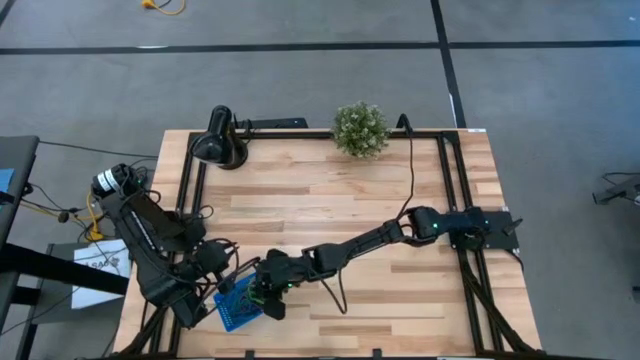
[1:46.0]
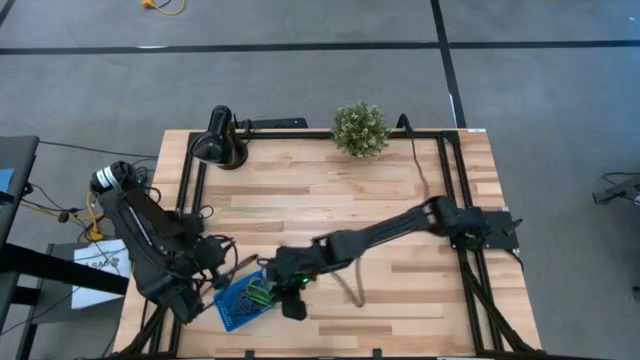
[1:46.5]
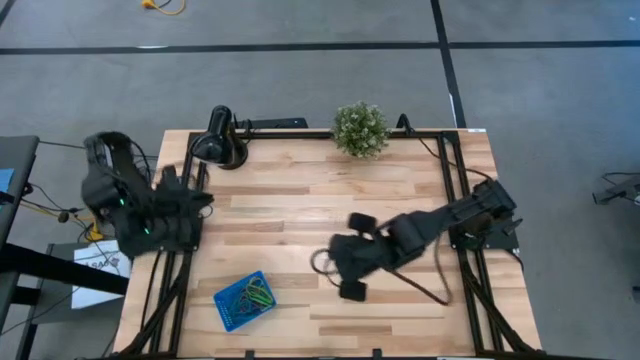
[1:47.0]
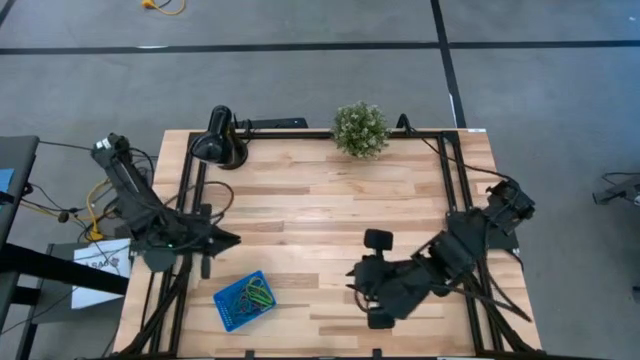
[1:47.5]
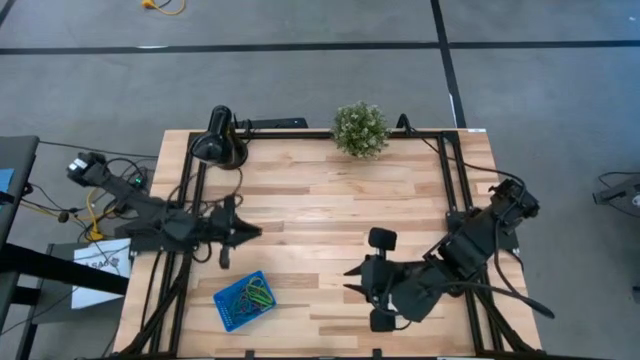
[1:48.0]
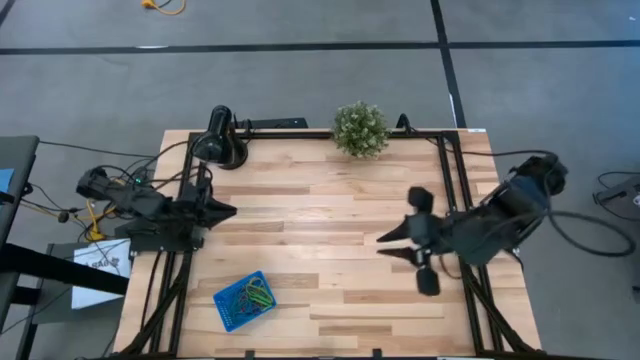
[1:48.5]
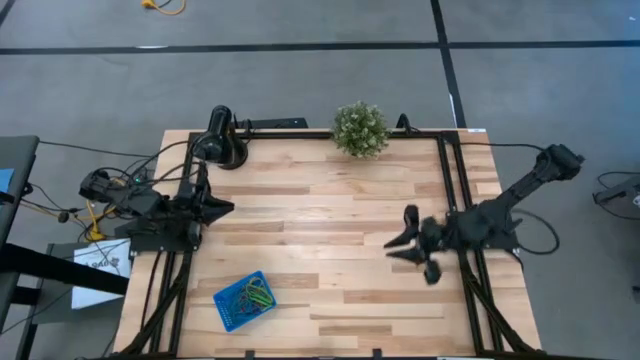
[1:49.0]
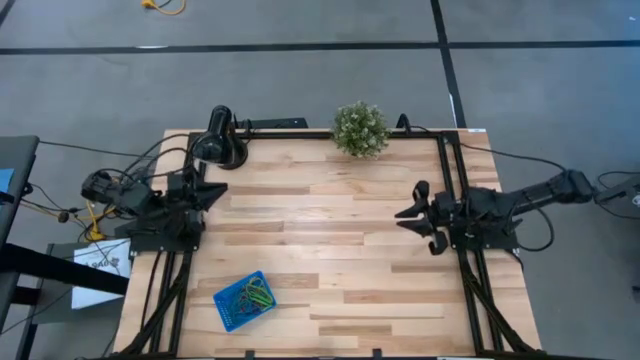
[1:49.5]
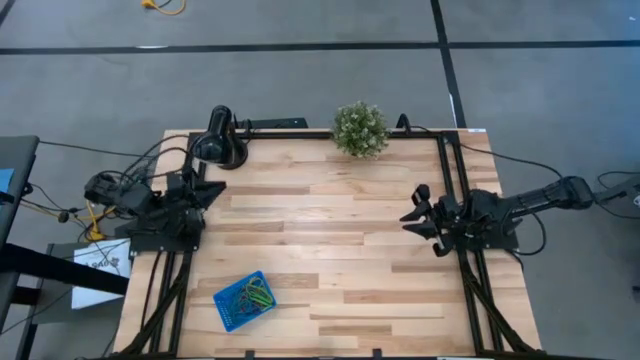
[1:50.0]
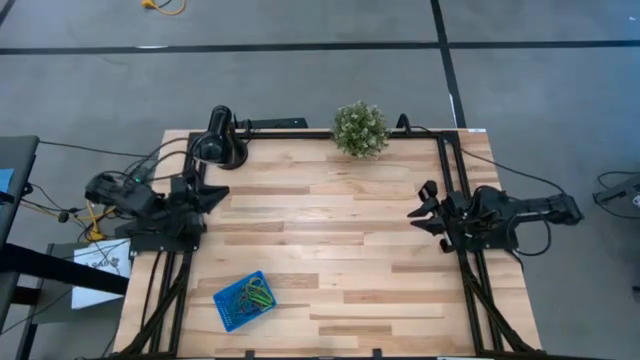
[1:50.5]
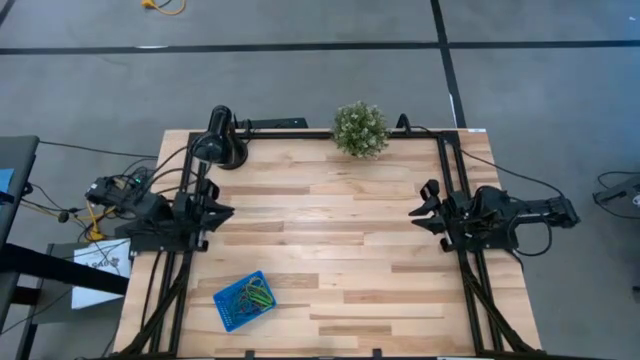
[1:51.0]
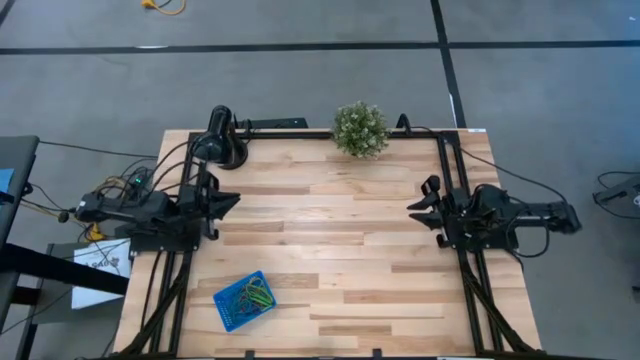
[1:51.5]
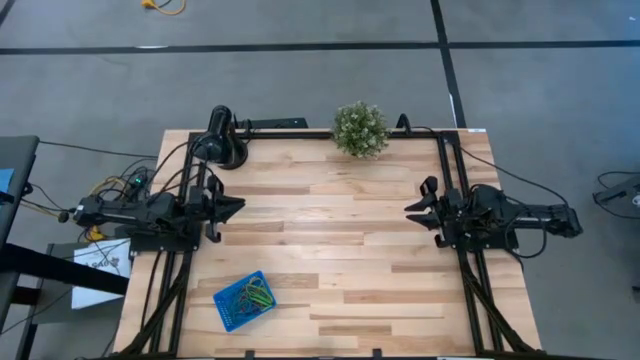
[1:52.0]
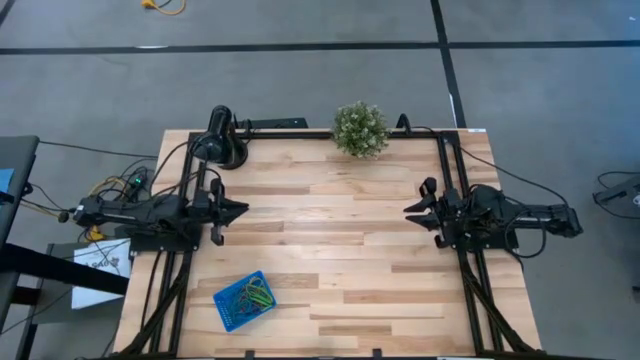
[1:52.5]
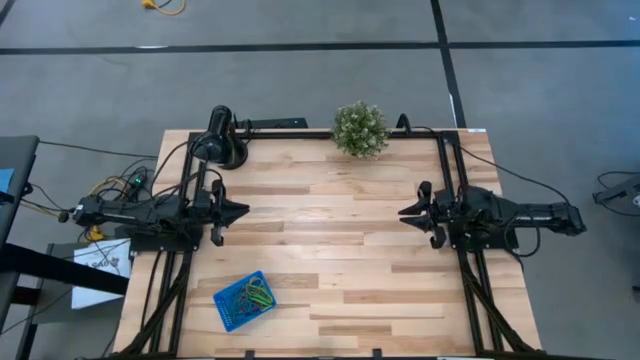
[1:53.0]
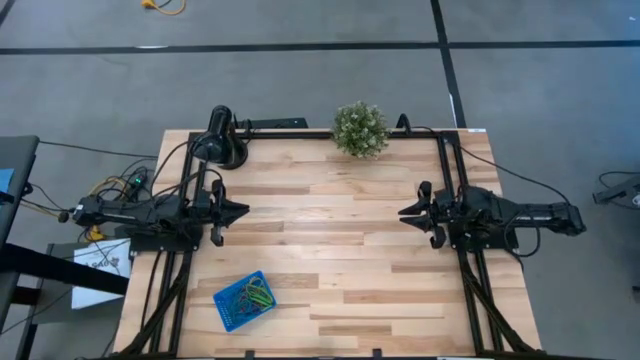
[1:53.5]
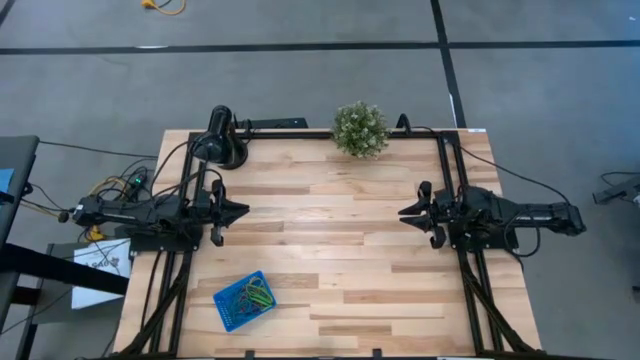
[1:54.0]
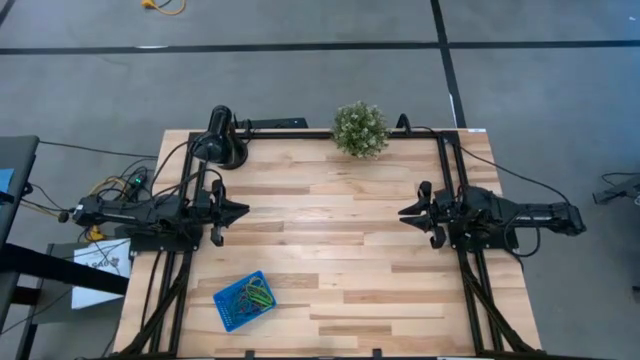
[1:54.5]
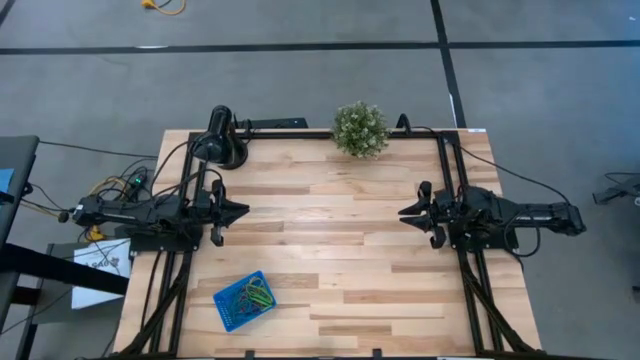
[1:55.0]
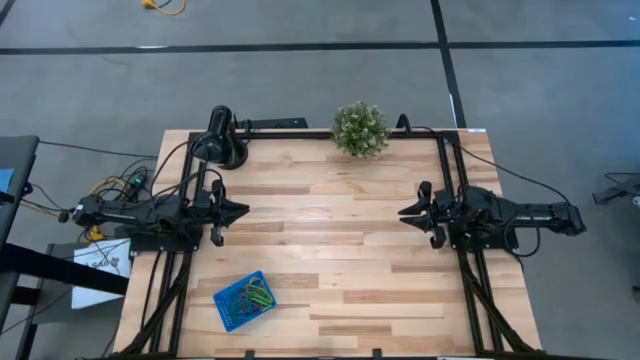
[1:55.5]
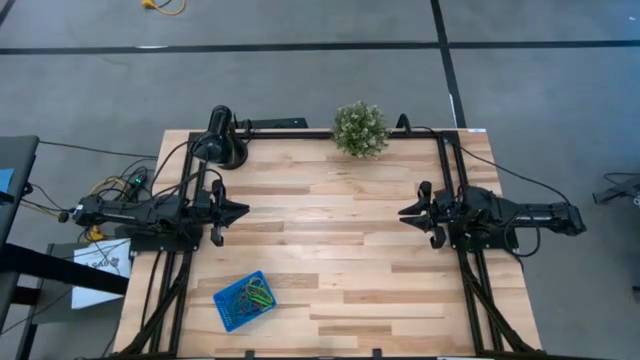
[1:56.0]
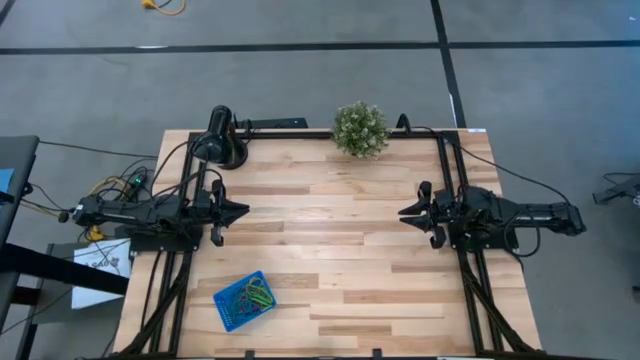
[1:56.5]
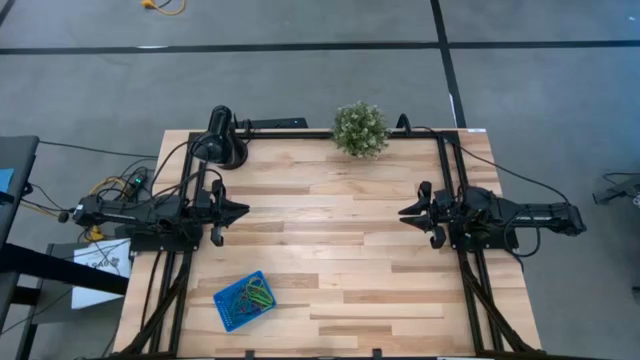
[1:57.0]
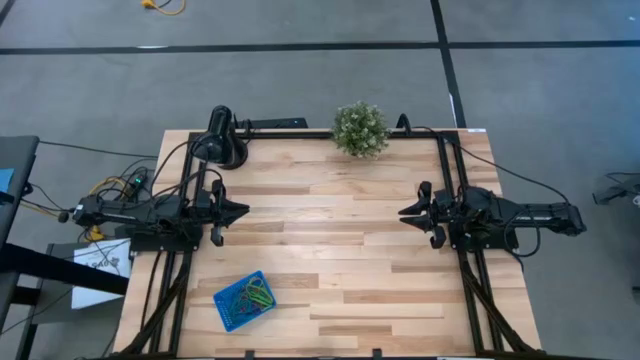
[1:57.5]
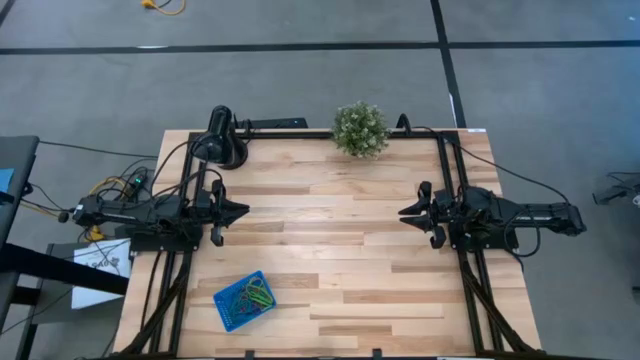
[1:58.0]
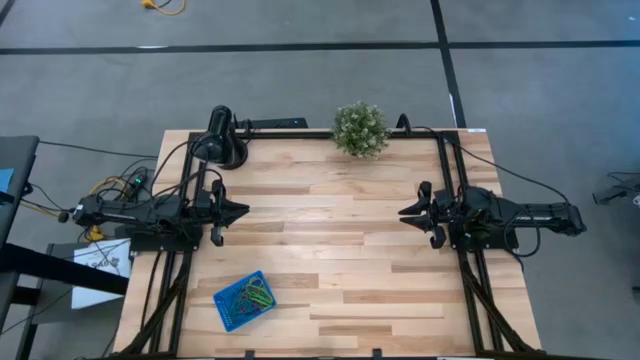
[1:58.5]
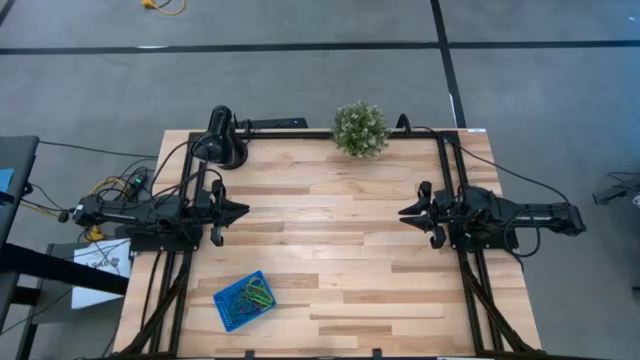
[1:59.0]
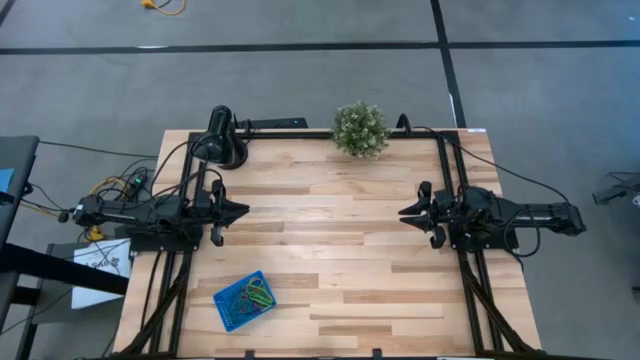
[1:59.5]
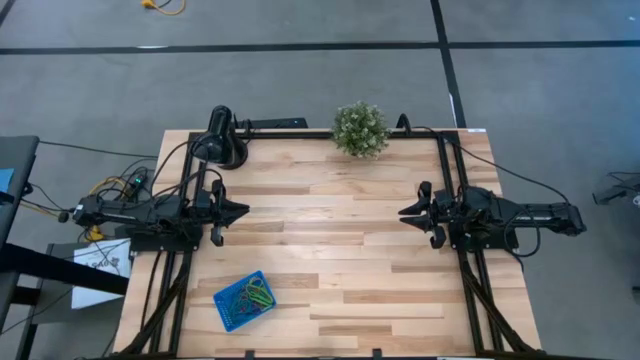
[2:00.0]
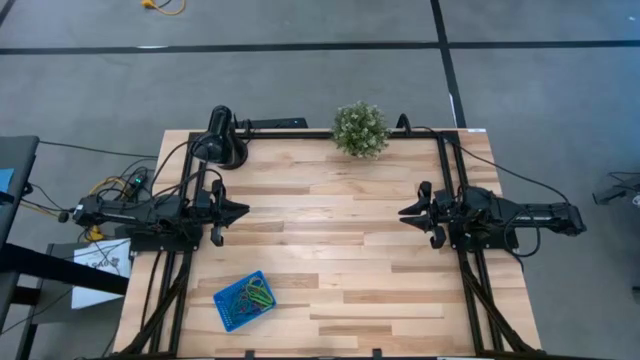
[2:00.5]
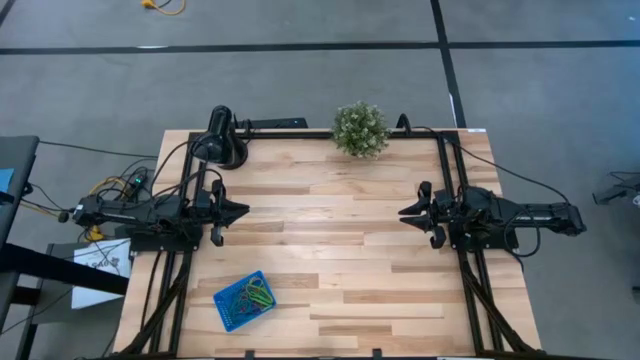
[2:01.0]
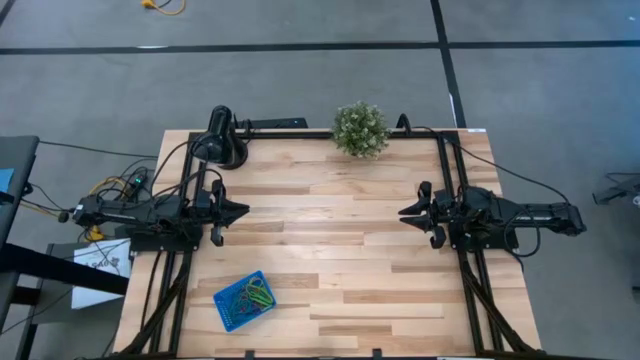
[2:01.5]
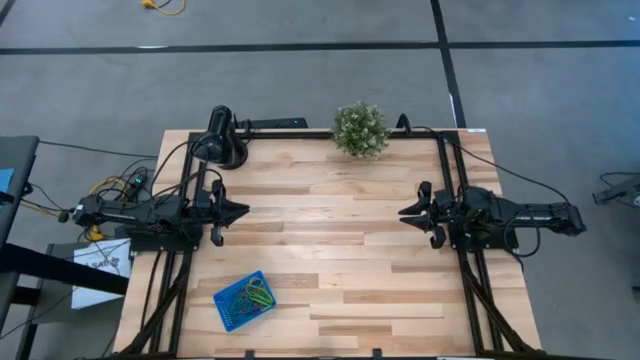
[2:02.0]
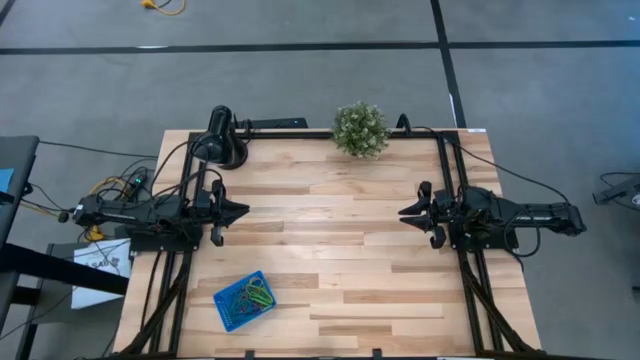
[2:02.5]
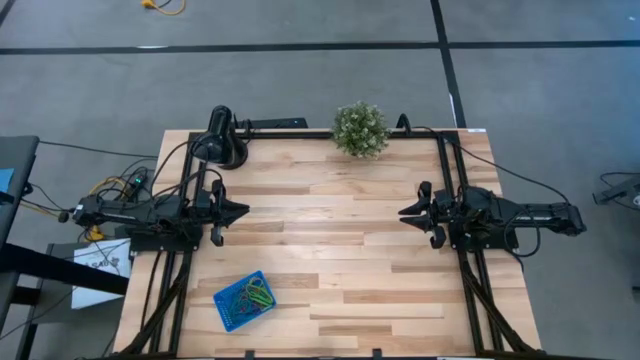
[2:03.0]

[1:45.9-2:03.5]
Task: Pick and place rubber bands into bin
Return to Home Position

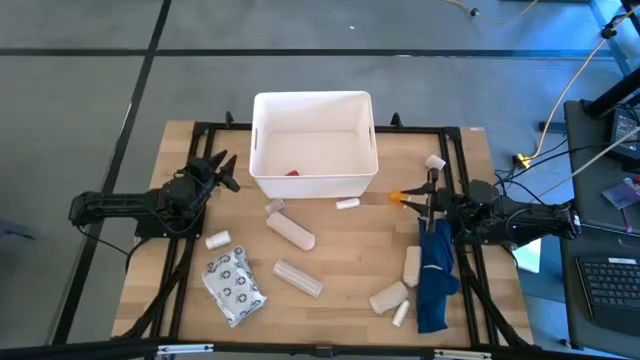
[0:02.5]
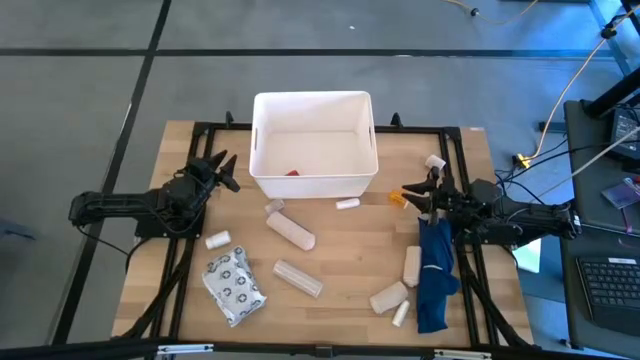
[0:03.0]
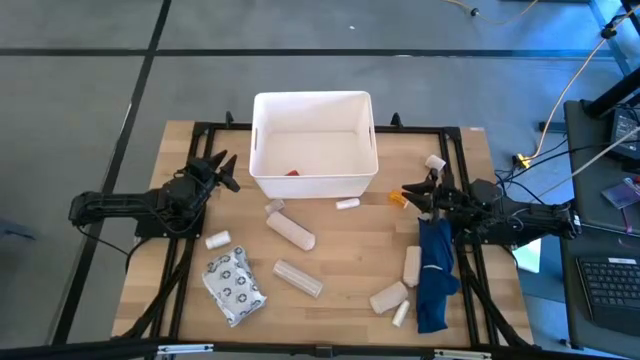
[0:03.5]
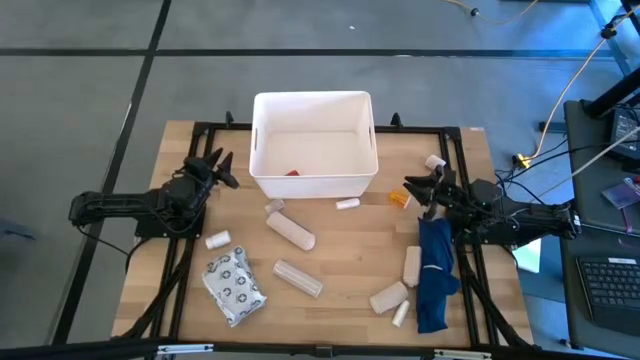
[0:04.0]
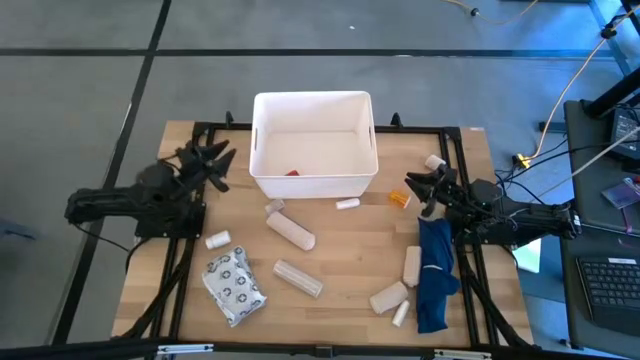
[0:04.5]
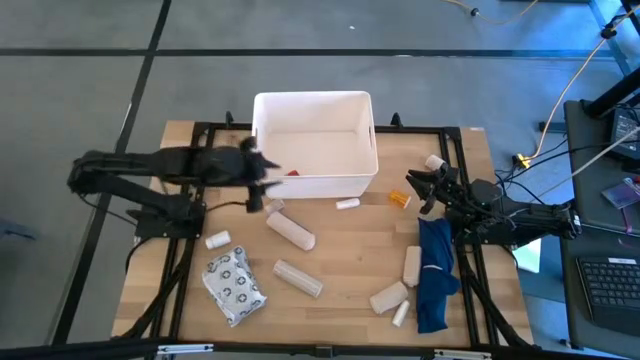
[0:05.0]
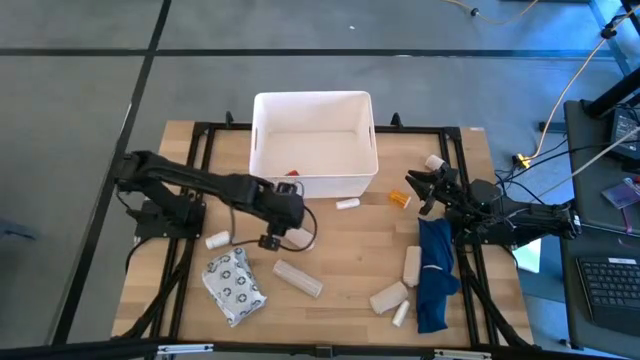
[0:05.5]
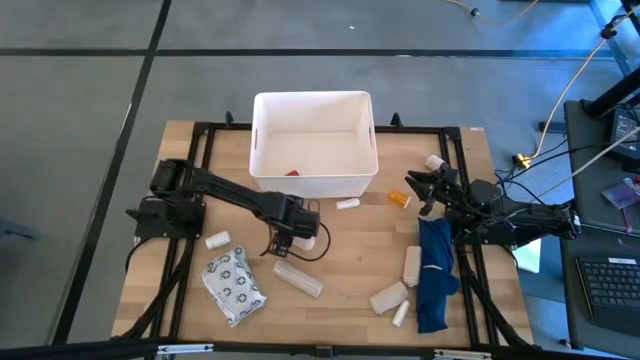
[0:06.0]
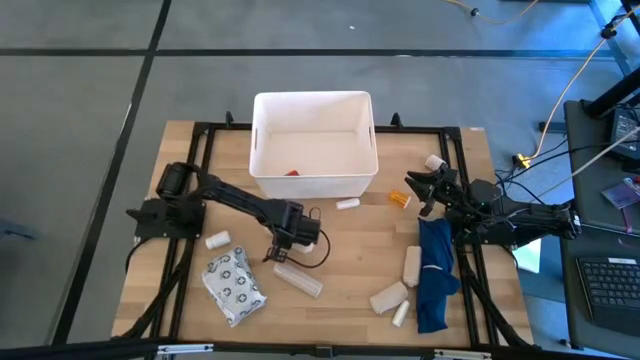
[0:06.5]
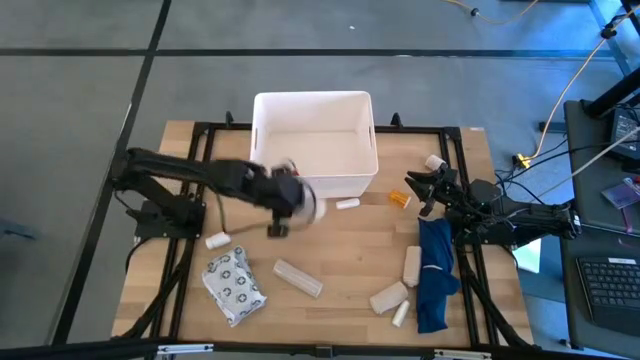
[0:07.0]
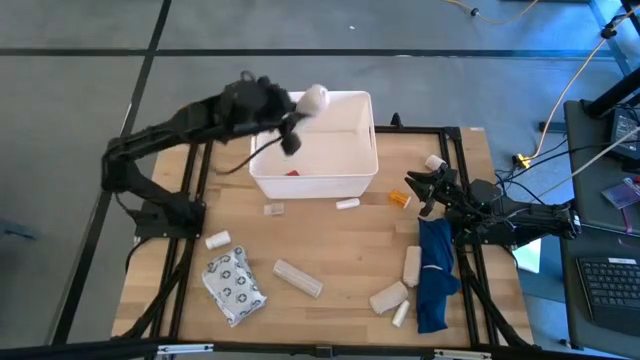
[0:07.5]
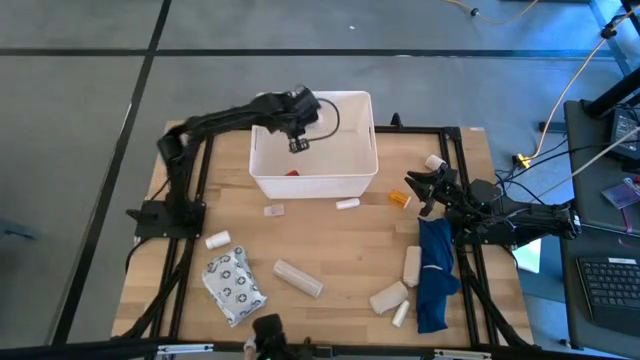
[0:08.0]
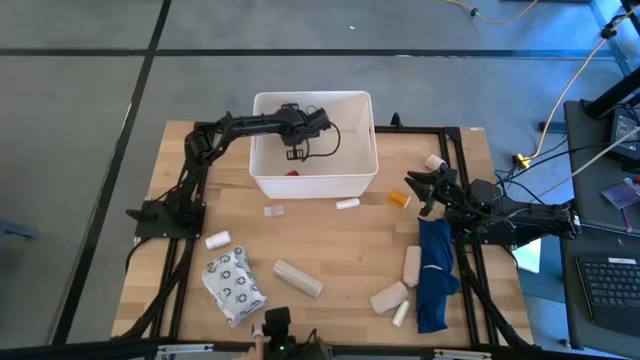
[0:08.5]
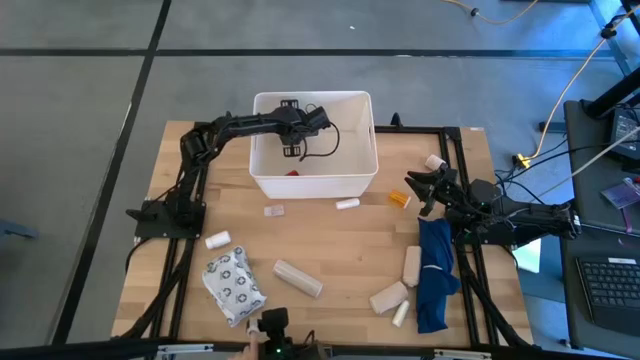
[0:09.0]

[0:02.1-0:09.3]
Task: Pick & place medical supplies in basket/bin
Put the white bandage into the white bin
